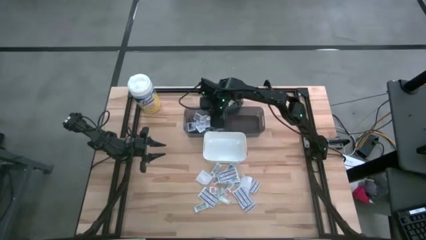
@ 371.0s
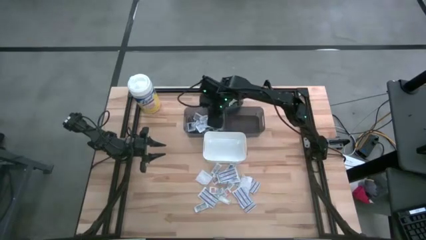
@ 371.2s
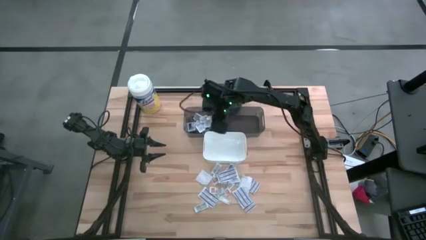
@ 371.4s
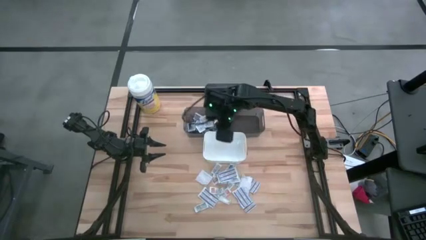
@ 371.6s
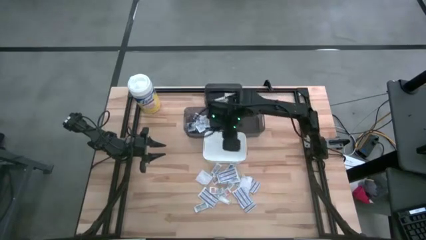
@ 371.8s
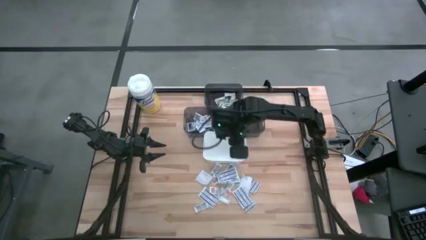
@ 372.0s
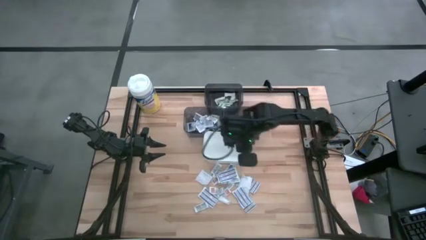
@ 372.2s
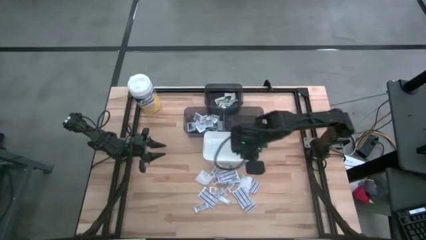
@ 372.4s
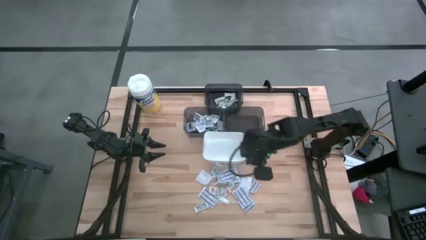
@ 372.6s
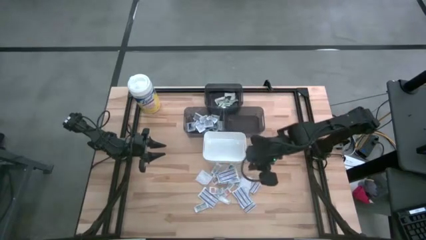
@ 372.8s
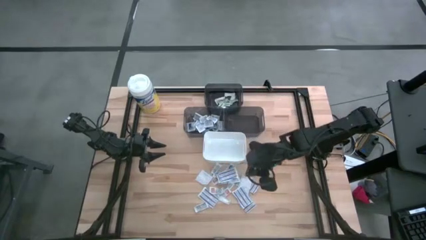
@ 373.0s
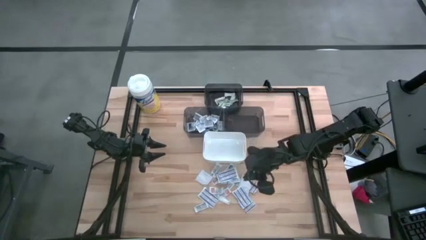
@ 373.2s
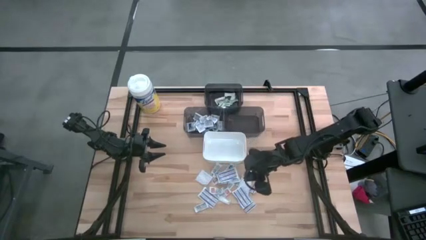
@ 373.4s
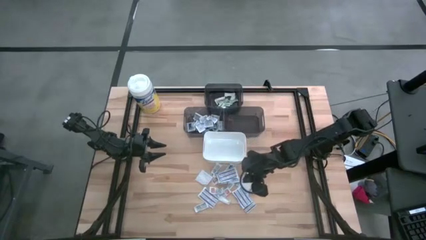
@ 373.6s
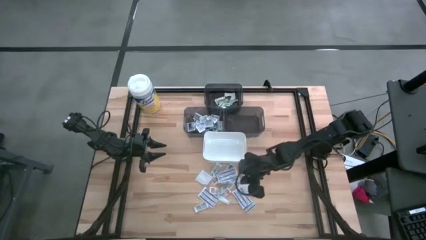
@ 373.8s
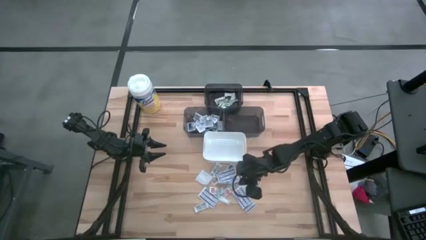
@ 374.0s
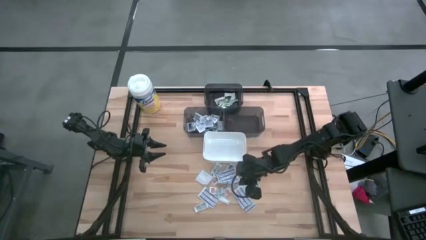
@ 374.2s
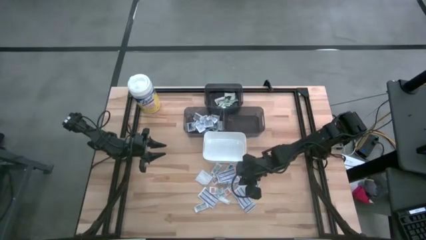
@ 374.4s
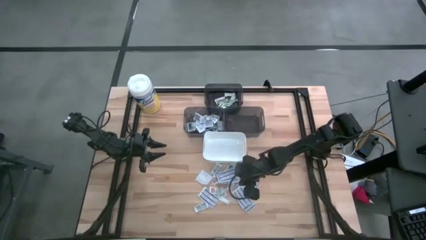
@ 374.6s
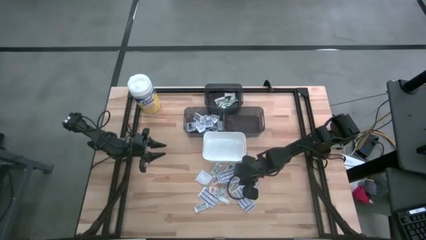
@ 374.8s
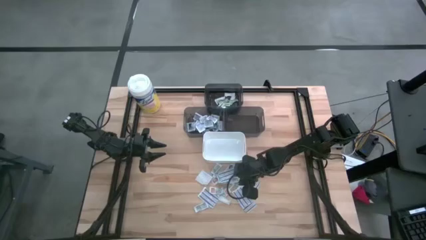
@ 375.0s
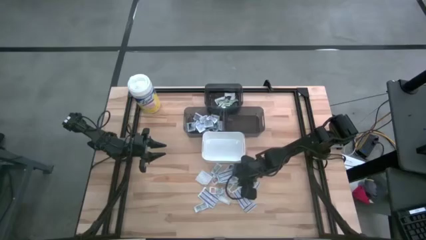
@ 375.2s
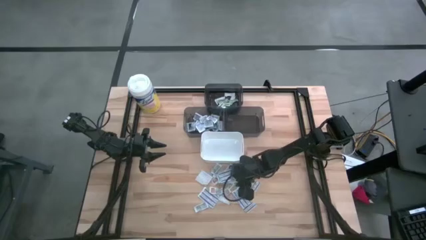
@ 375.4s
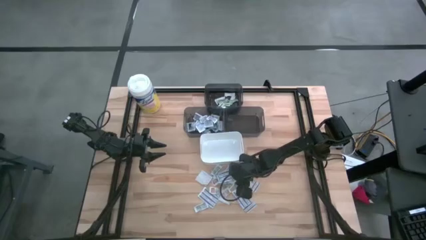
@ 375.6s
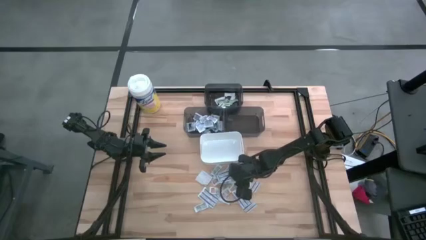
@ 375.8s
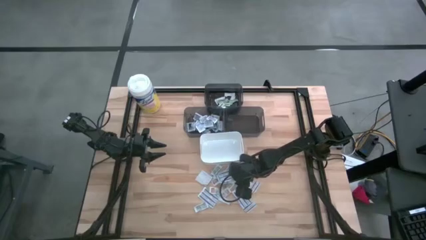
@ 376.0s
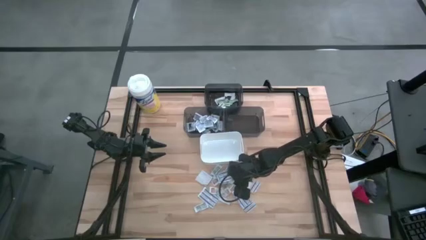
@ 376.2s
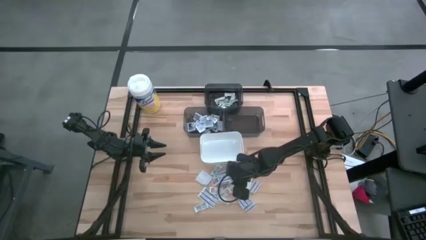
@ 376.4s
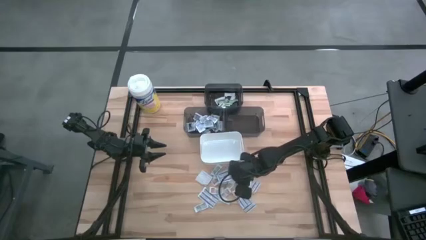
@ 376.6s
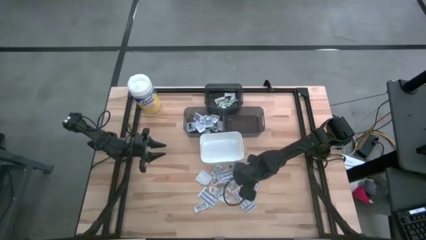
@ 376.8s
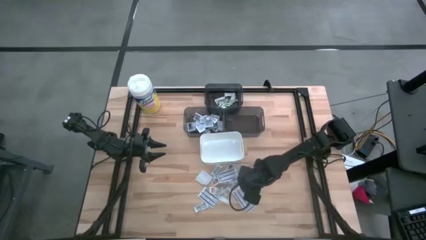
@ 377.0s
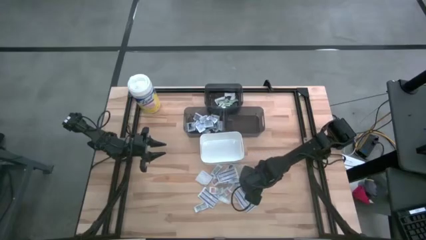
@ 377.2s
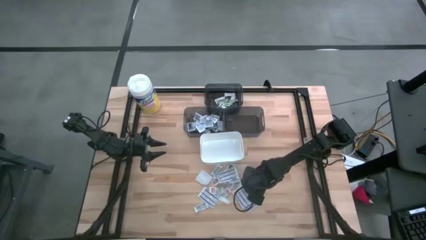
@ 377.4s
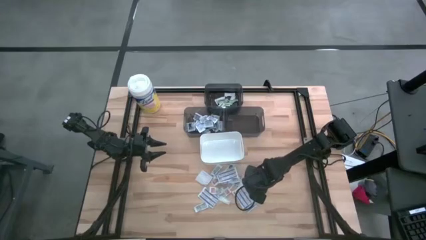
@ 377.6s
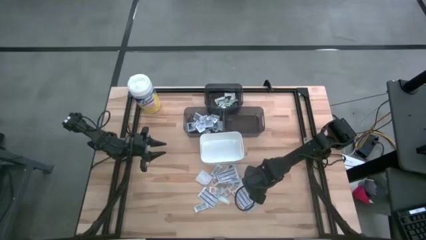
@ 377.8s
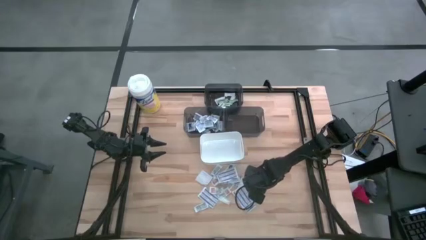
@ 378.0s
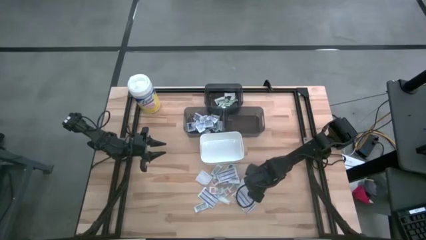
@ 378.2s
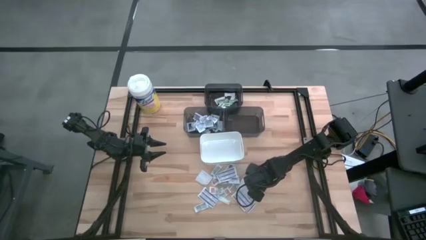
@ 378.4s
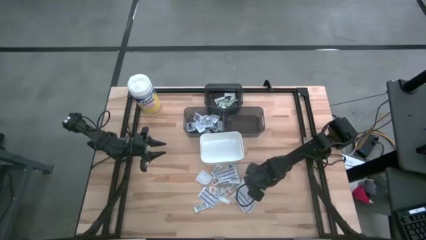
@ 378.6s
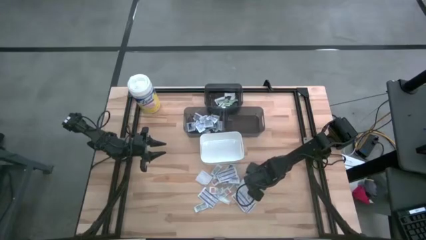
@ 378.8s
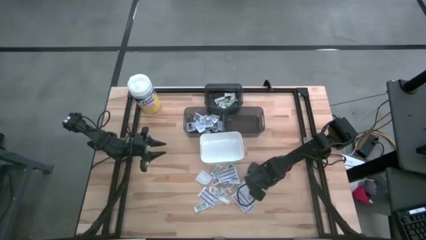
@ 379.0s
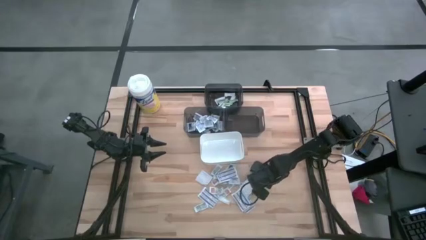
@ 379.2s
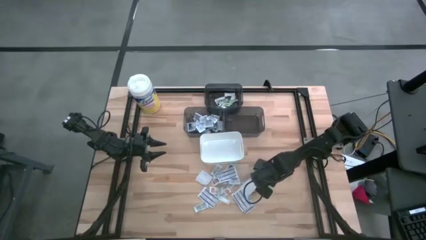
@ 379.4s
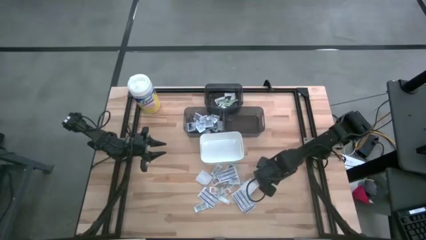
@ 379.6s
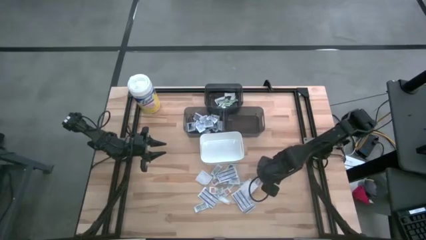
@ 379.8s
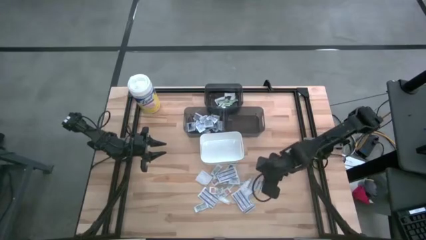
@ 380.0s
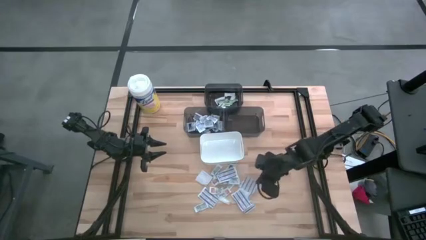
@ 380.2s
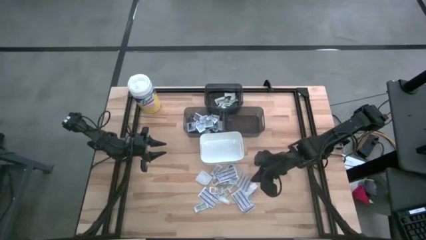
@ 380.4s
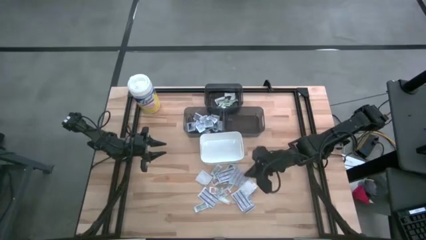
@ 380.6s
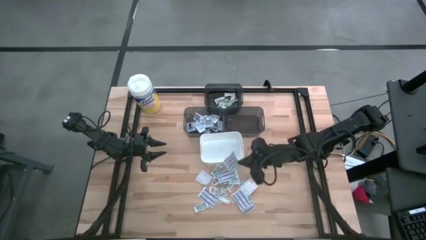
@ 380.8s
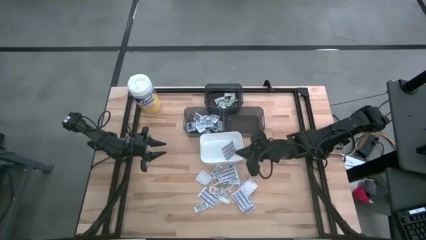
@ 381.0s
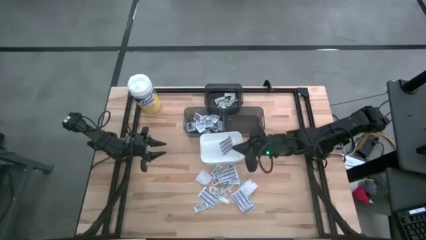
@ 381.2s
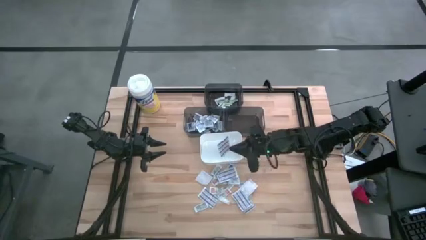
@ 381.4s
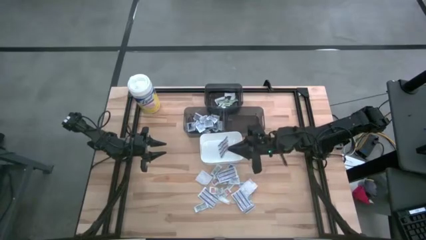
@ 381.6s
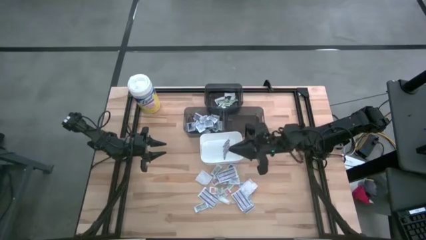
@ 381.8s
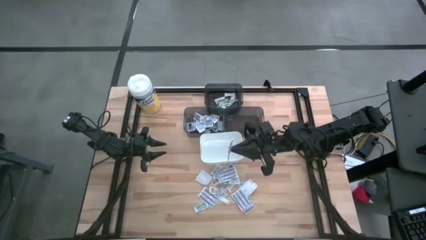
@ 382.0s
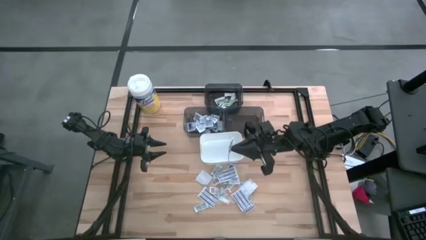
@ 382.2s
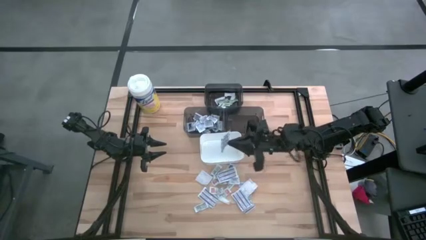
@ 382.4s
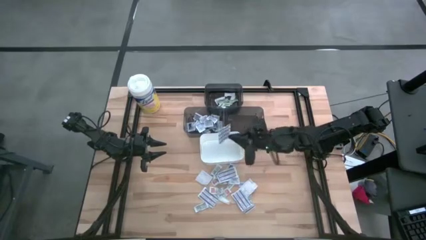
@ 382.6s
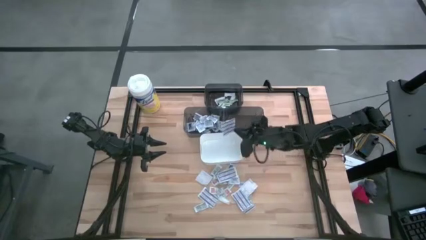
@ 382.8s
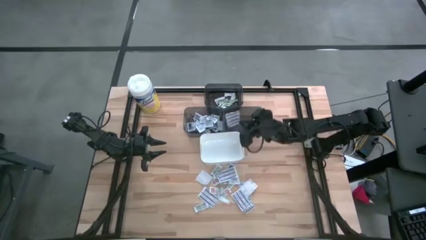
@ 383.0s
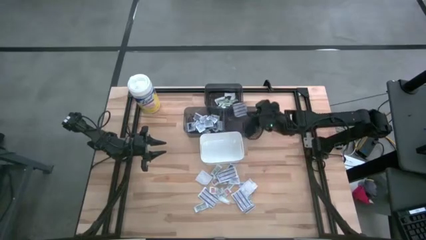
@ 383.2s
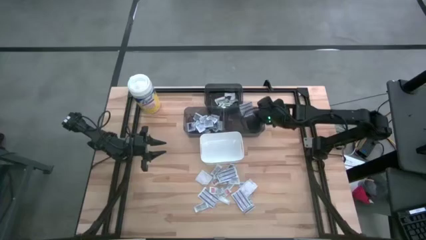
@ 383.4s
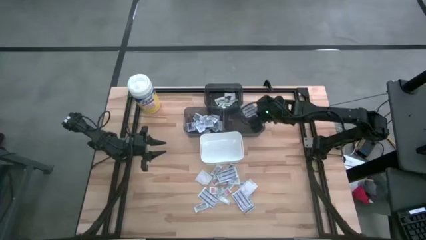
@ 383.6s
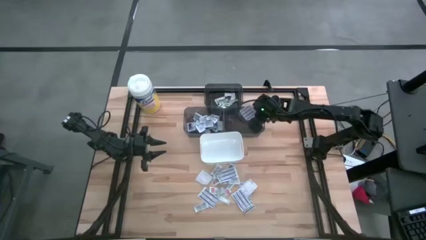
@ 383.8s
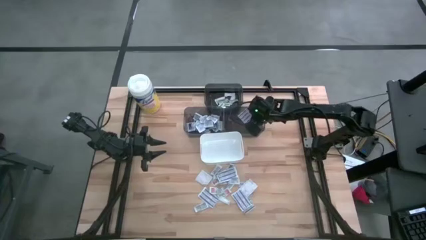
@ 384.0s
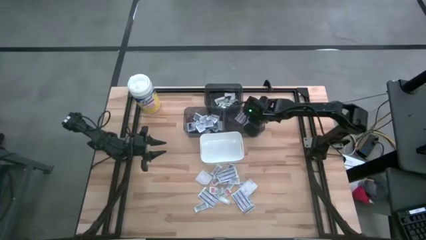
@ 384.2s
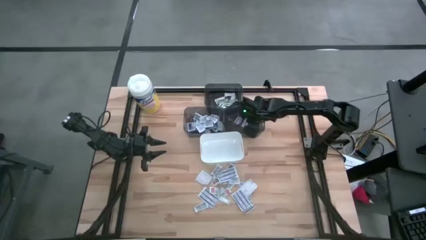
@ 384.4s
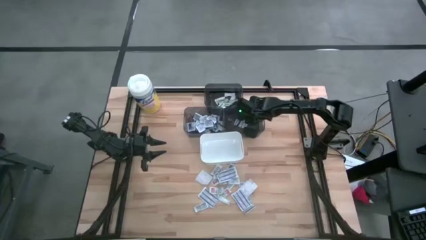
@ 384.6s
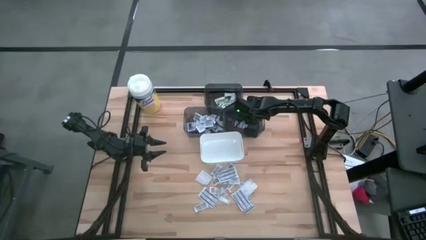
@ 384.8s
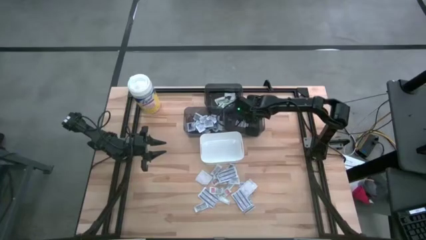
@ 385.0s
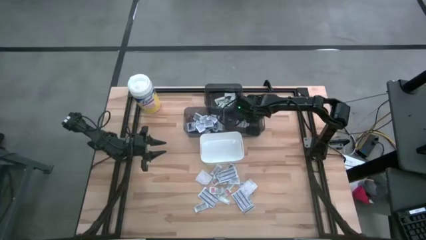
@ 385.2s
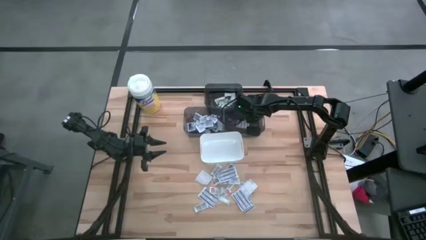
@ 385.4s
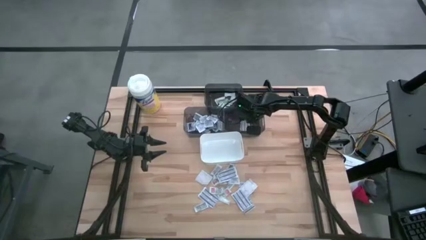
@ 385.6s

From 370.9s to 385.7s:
Task: Pick & Place First Aid Supplies
Put the blue bandage into the right black bin

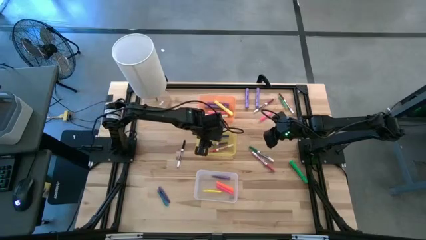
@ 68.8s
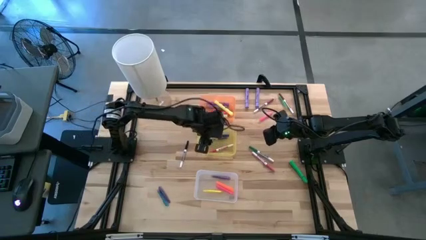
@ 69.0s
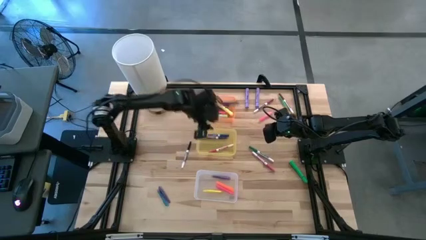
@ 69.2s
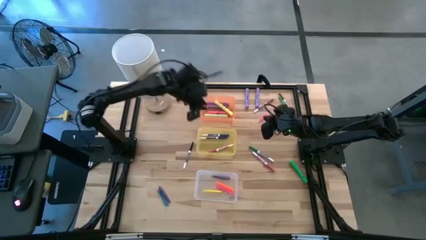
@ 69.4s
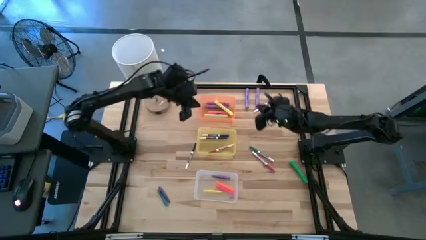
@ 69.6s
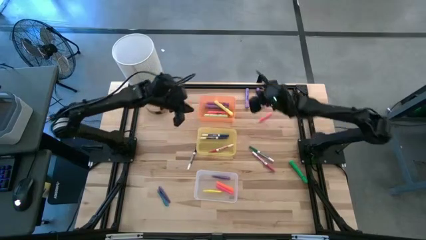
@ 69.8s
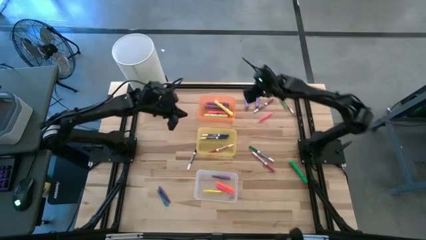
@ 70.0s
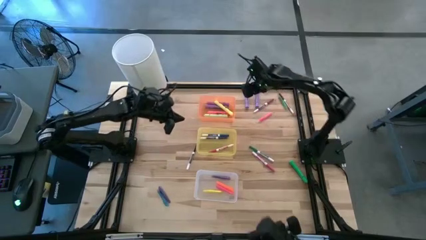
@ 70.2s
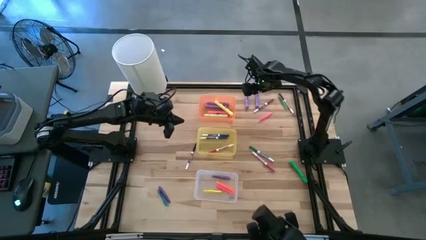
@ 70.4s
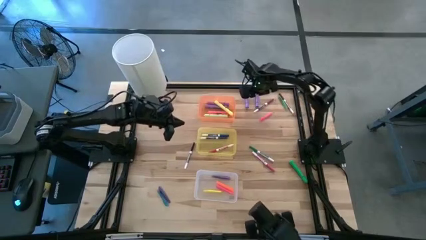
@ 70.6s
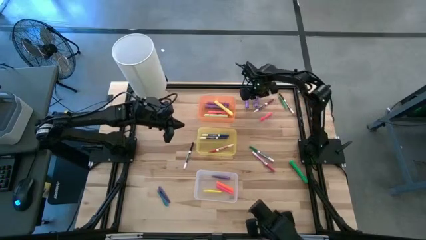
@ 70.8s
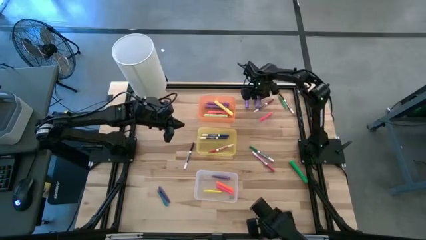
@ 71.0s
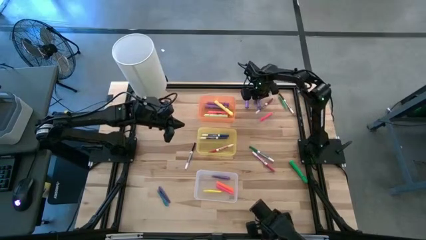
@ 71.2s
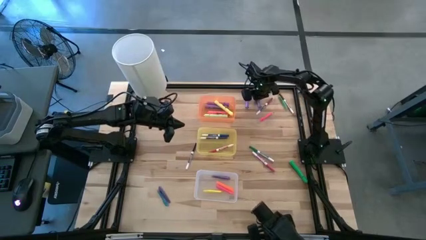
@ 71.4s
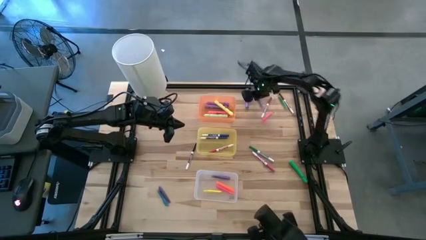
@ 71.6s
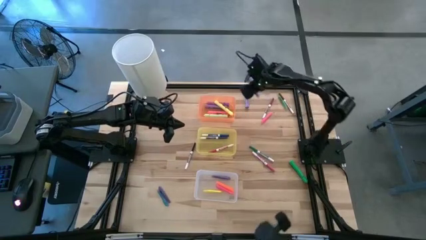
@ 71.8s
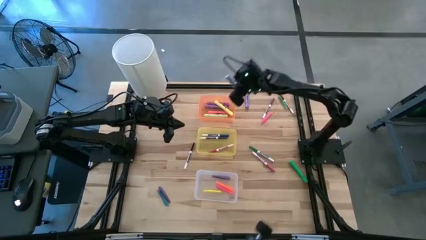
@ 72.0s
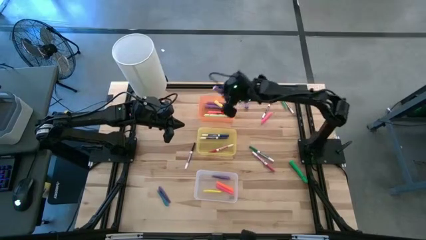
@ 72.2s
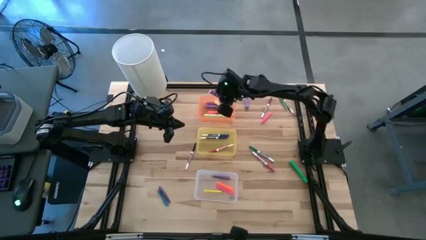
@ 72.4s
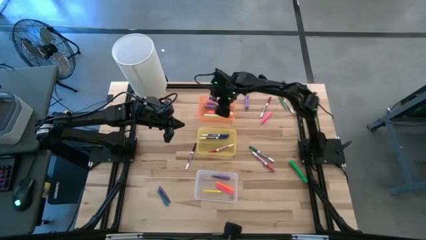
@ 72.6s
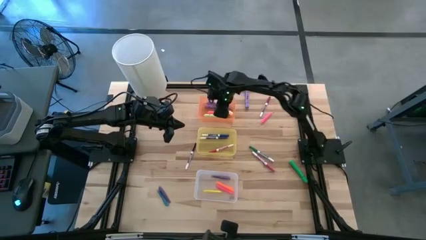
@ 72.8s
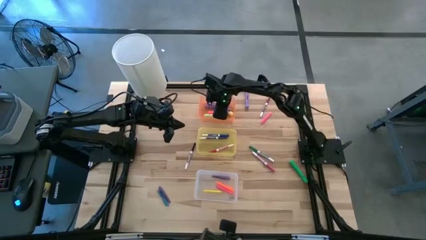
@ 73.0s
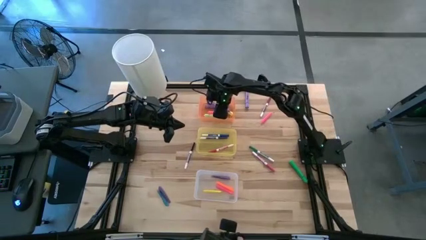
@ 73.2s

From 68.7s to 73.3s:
Task: Pick & Place Markers
Put the right light purple highlighter pen into the orange bin
